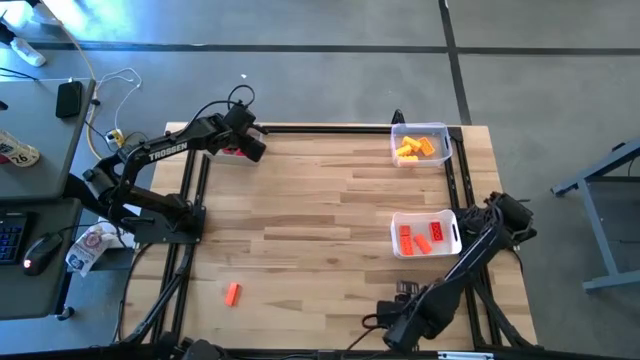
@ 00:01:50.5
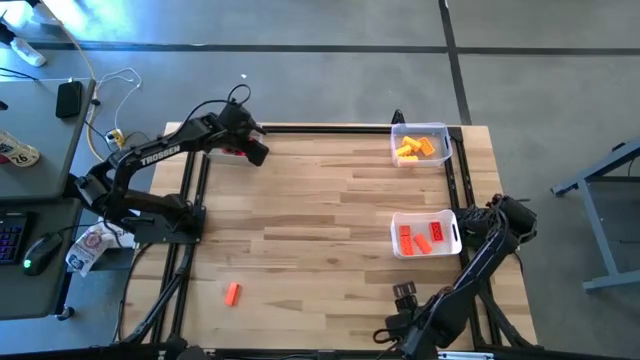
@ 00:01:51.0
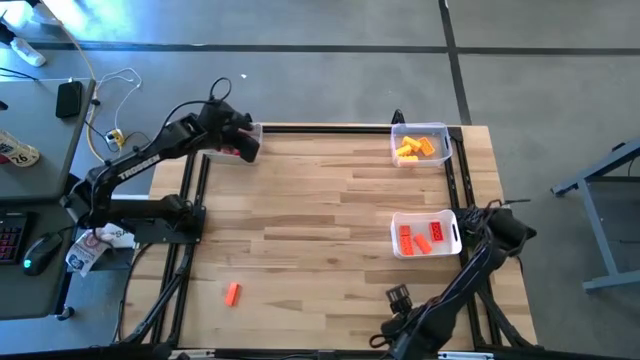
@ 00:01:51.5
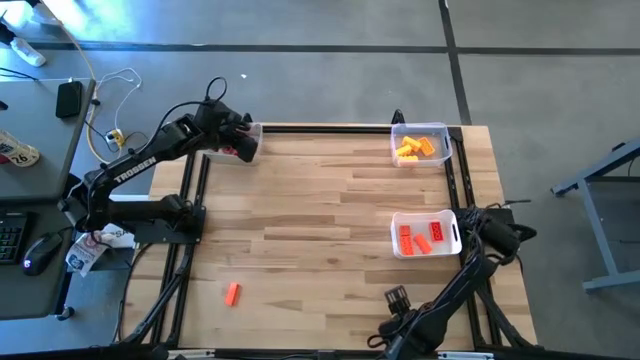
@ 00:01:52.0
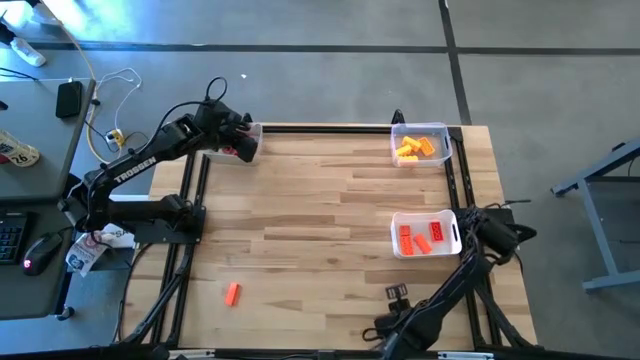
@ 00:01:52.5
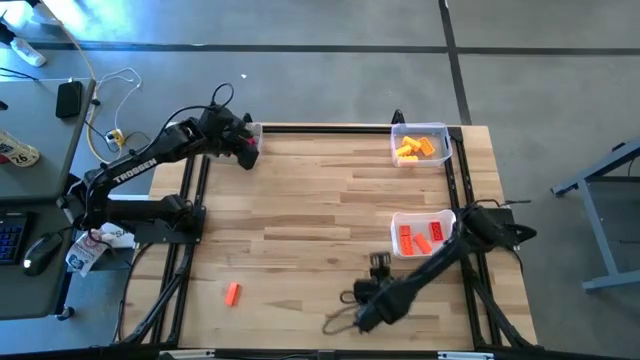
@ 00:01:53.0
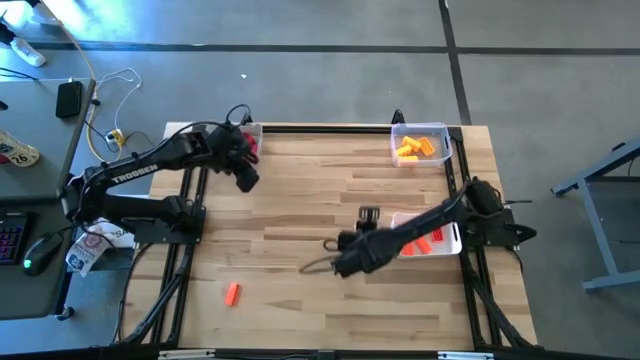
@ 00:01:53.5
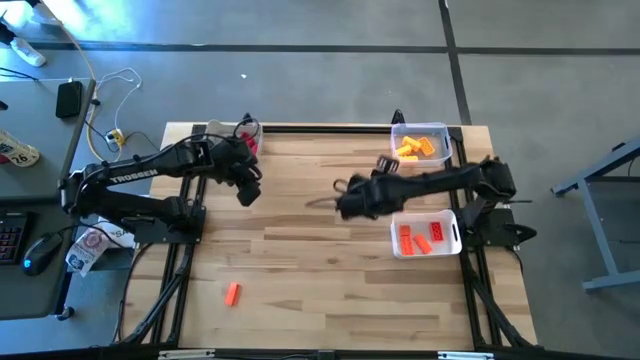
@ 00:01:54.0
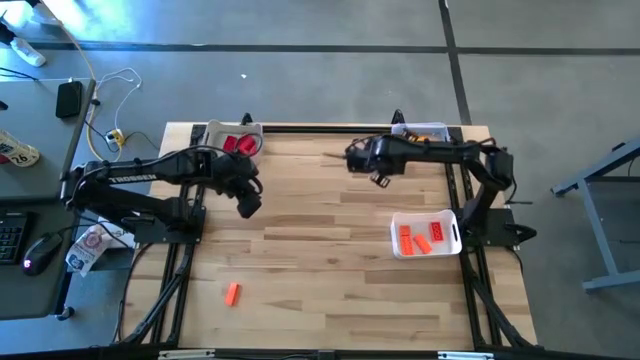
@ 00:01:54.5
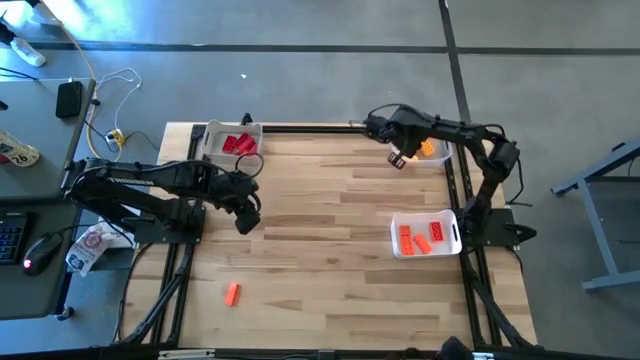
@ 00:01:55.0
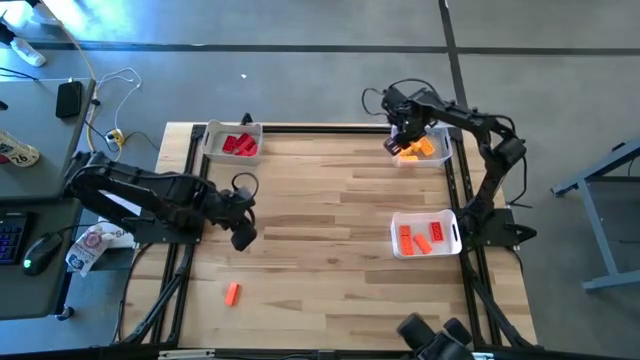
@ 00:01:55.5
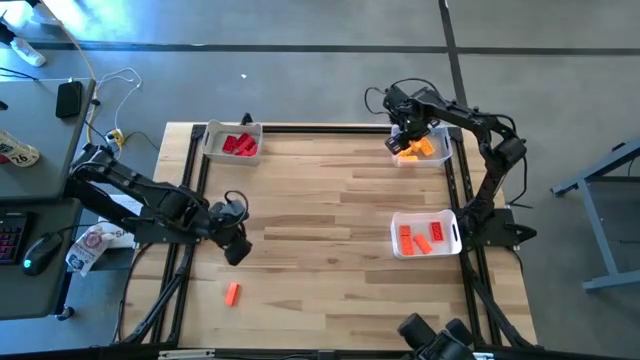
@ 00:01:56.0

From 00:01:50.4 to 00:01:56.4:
Task: Sort & place blocks by color
Put the yellow game piece into the transparent bin

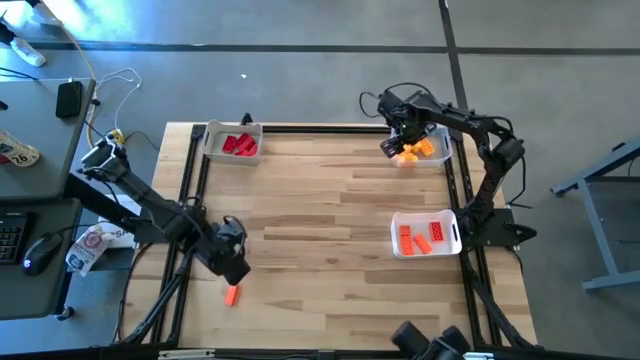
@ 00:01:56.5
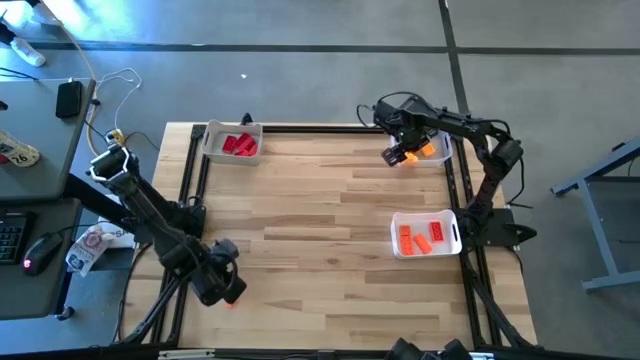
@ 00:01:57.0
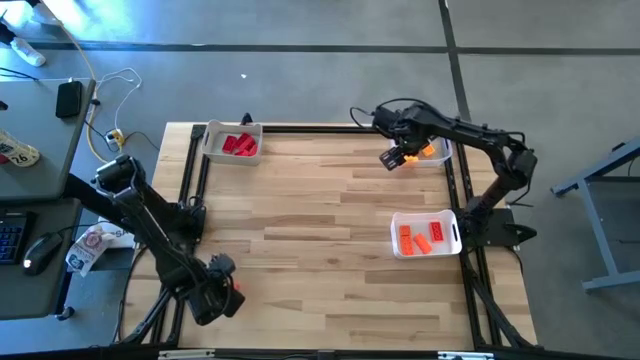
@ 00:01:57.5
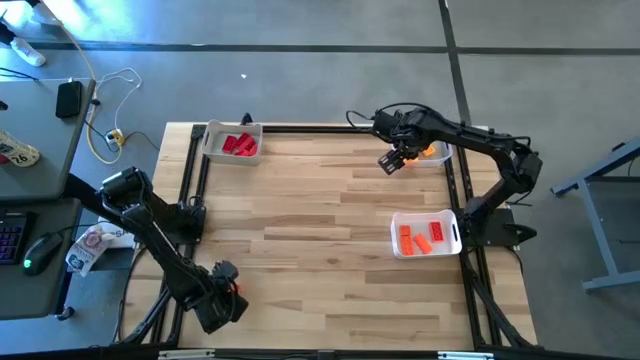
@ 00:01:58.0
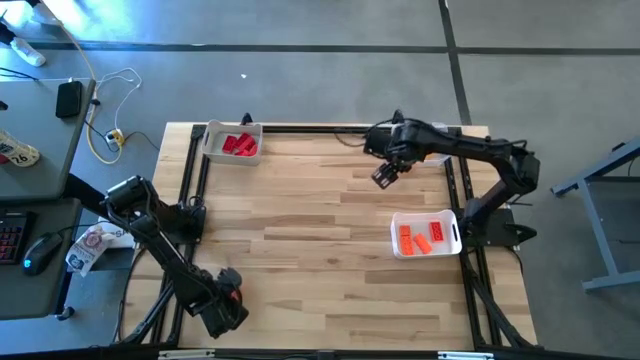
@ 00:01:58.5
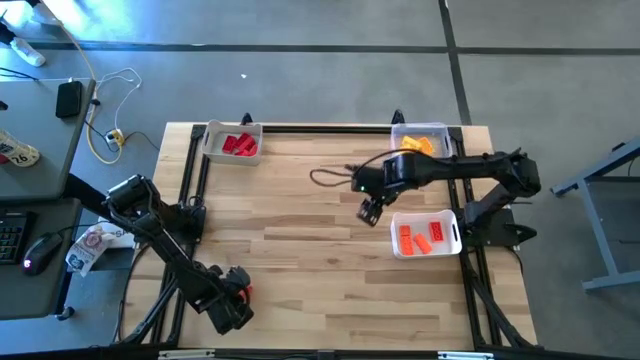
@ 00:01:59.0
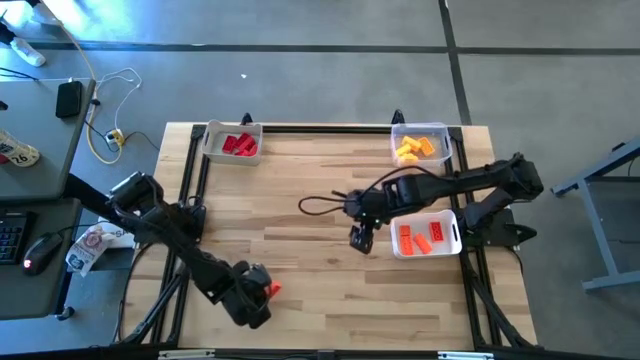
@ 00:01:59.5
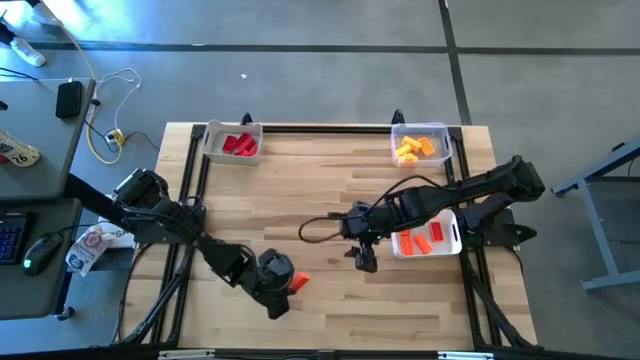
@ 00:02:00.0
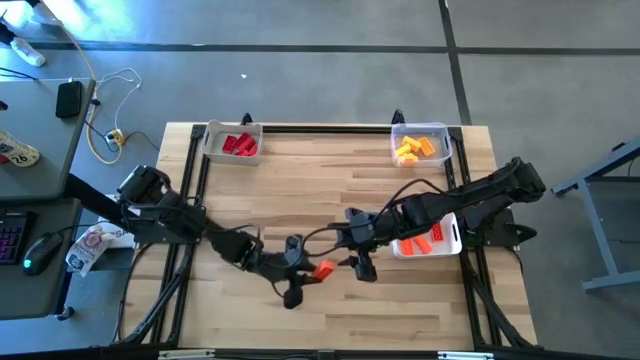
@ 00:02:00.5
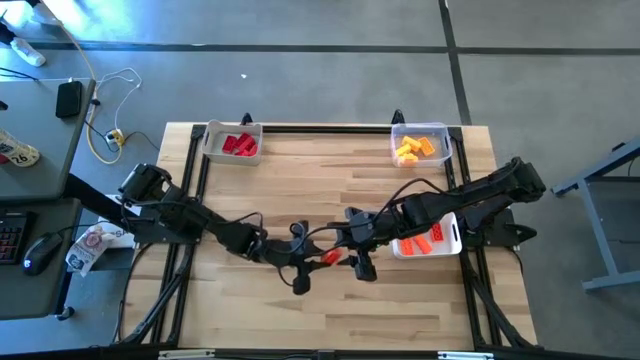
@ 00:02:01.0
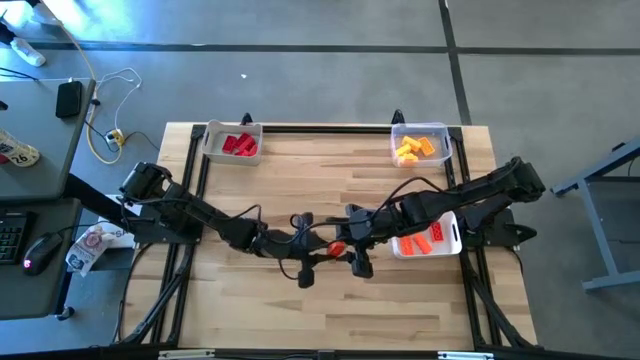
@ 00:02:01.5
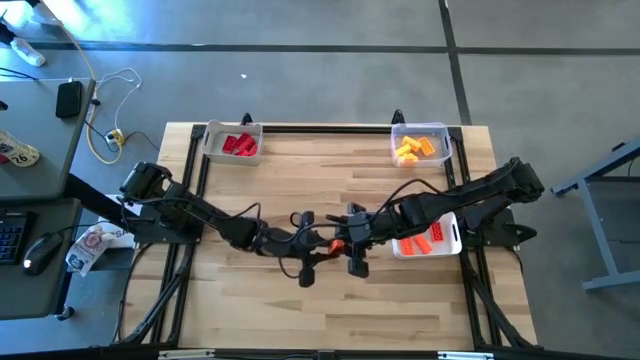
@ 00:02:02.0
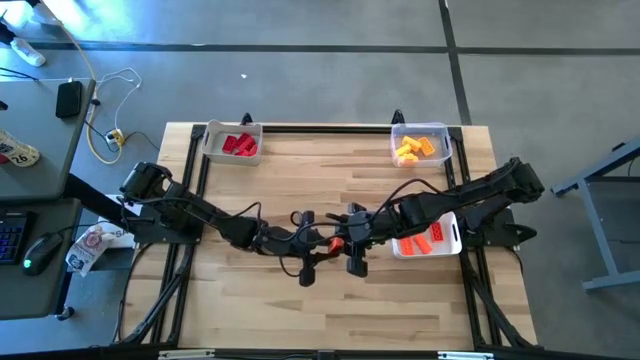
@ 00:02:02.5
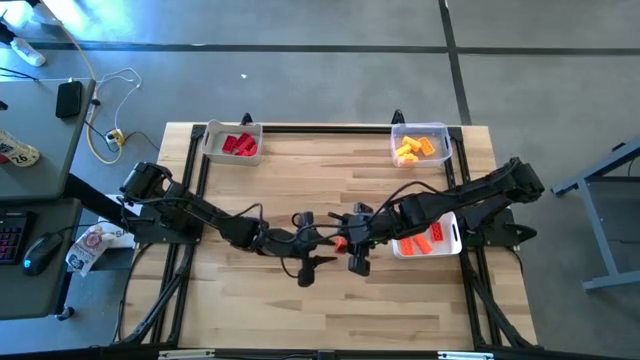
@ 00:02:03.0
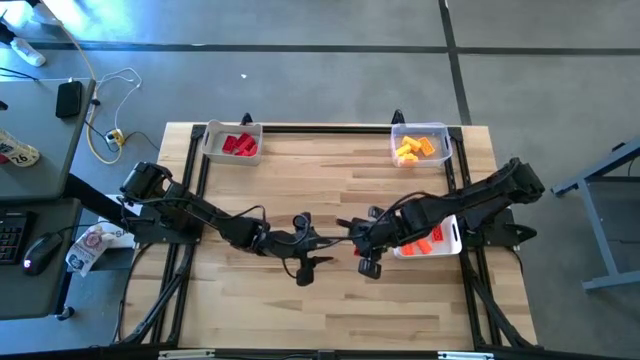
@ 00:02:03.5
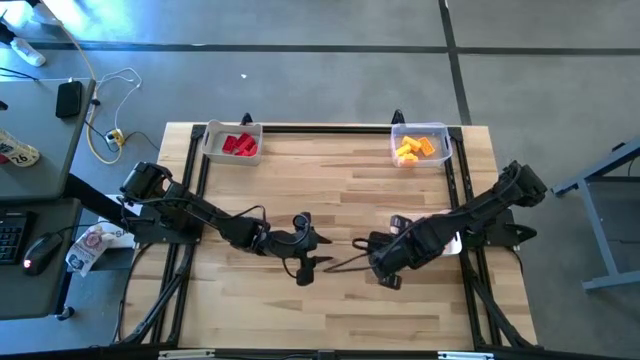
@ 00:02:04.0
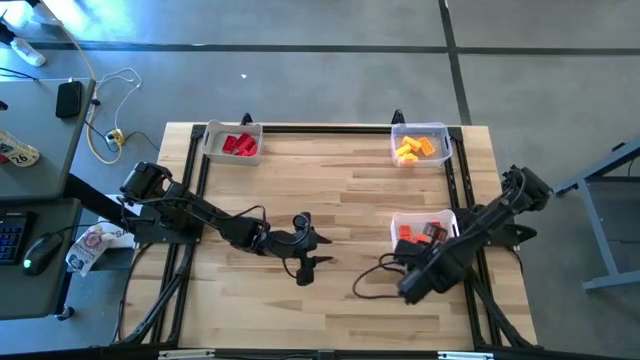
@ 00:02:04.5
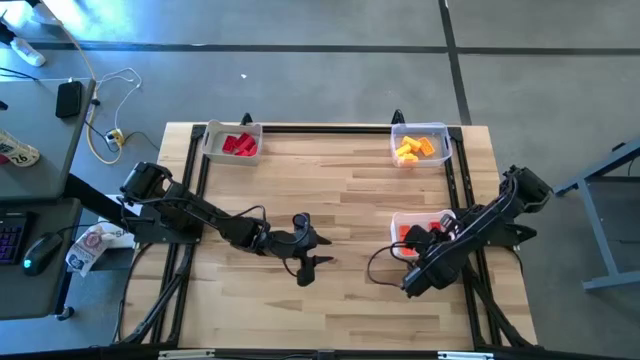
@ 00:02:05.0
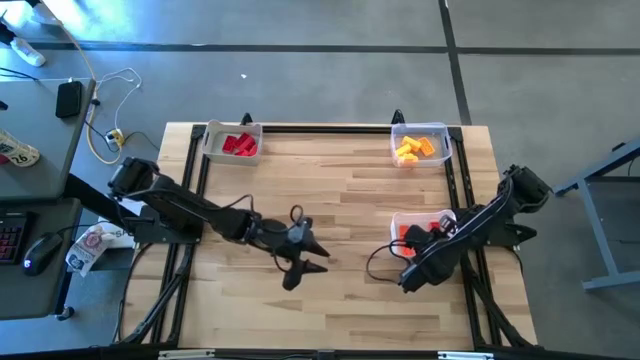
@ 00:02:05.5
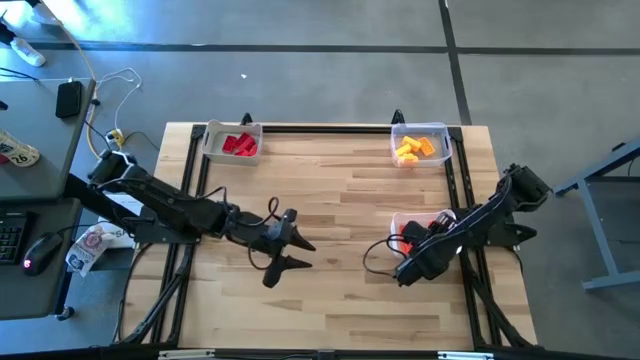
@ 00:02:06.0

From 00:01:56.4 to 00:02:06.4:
Put the orange game piece into the white bin

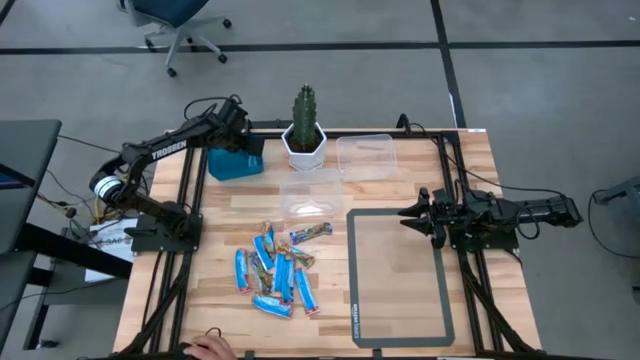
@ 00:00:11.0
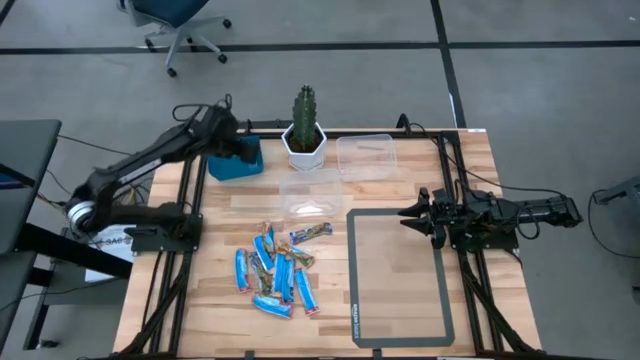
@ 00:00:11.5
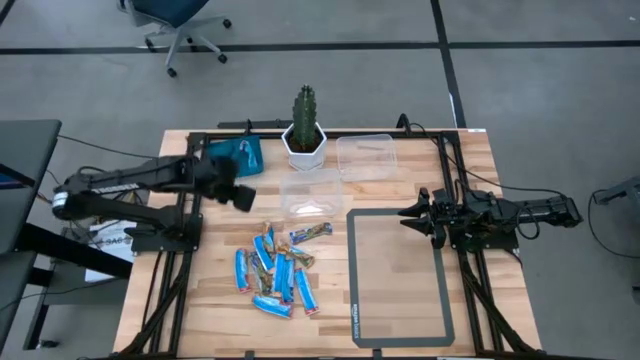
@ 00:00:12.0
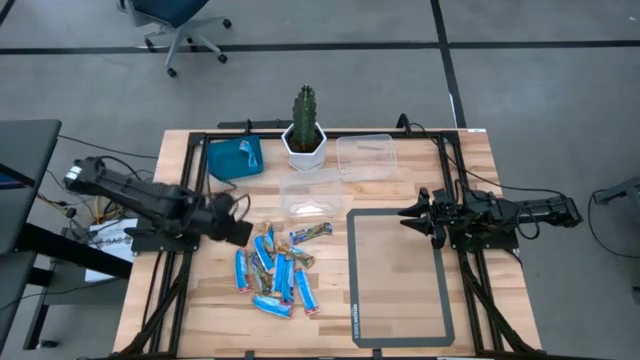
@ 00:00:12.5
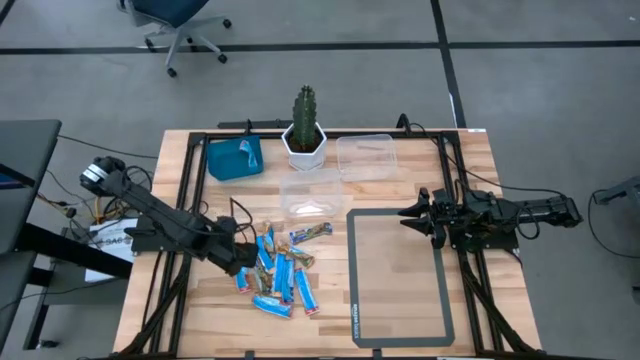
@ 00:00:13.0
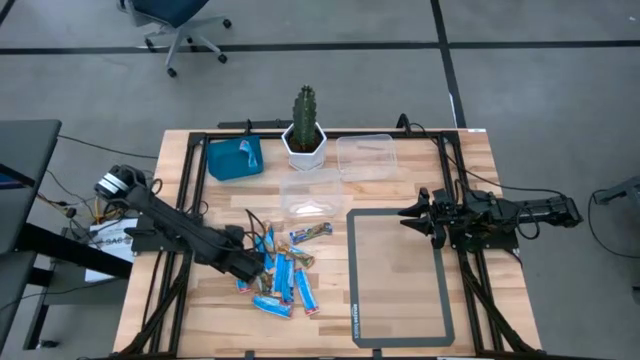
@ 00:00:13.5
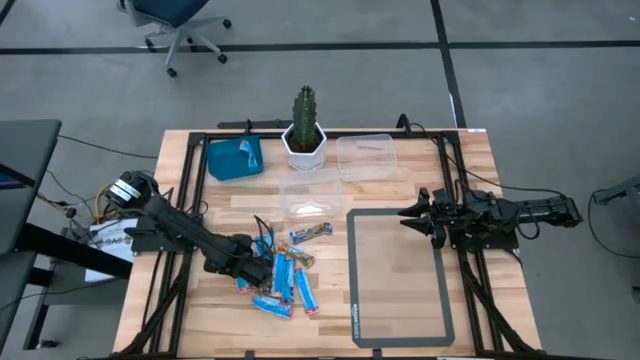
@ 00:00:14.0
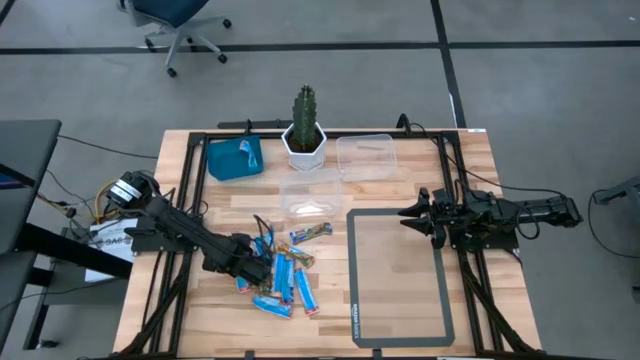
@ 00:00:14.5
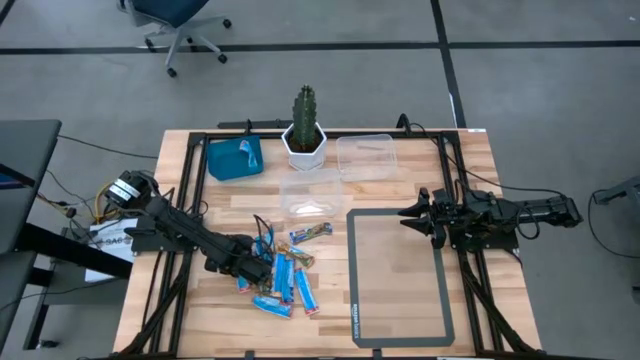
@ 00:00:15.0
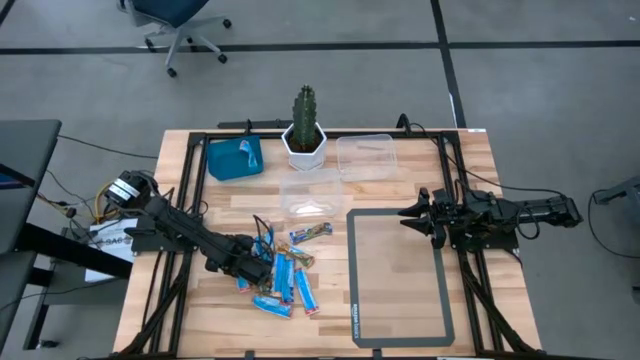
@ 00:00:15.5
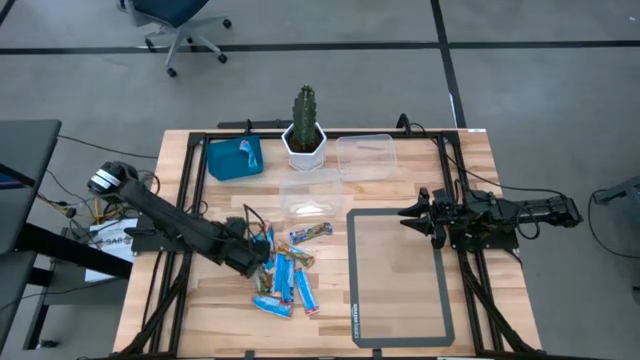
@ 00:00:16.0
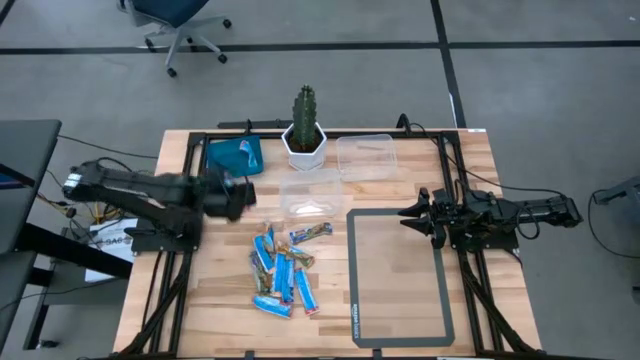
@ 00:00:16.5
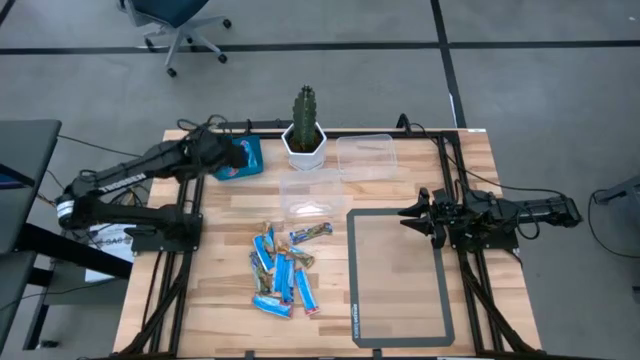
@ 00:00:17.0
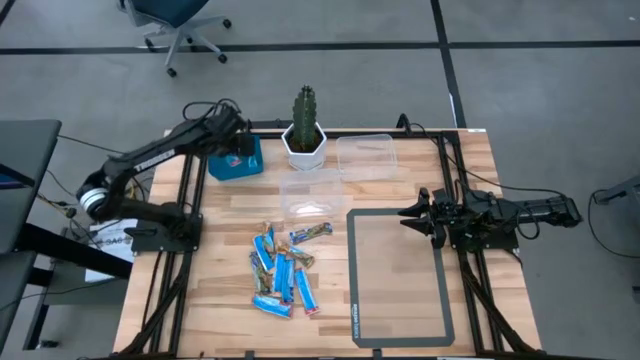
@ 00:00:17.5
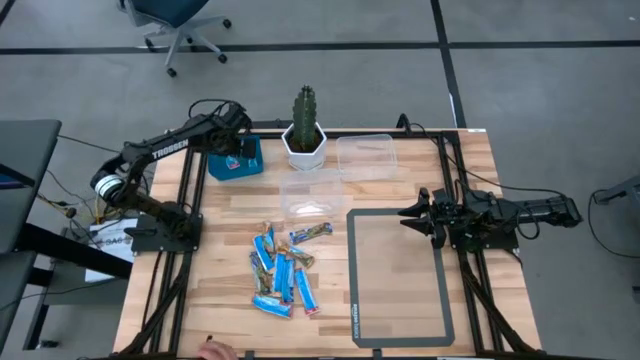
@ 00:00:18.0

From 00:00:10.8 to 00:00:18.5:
Task: Pick and place Granola Bars by type
Put the red granola bar into the blue bin
